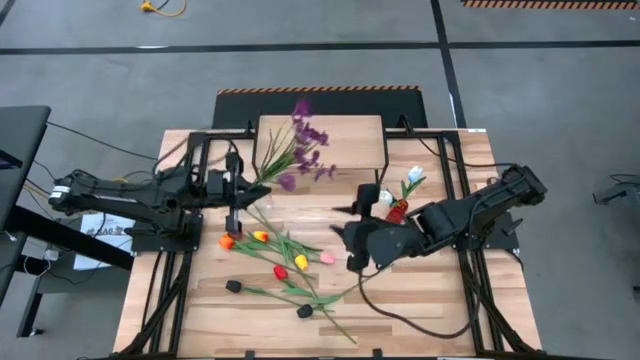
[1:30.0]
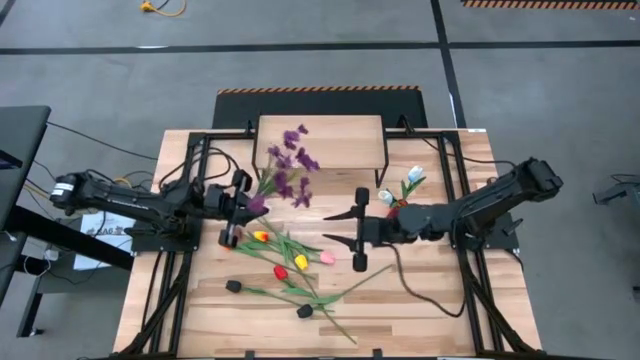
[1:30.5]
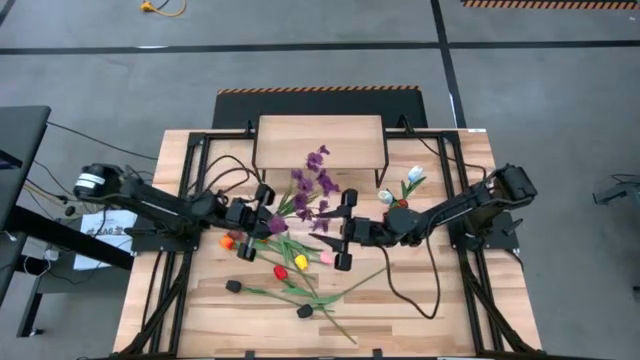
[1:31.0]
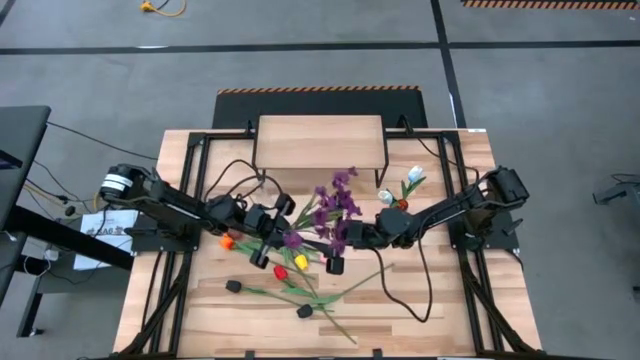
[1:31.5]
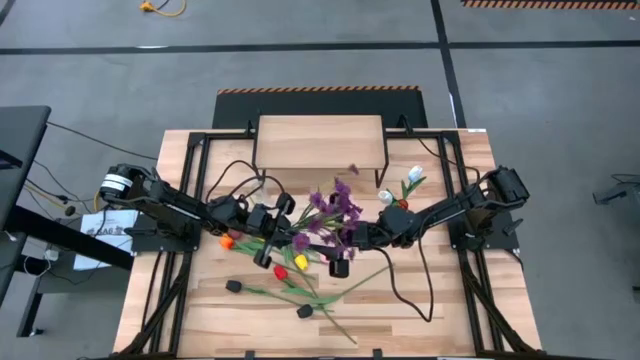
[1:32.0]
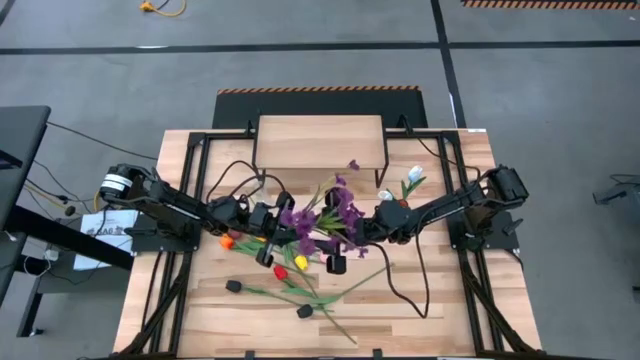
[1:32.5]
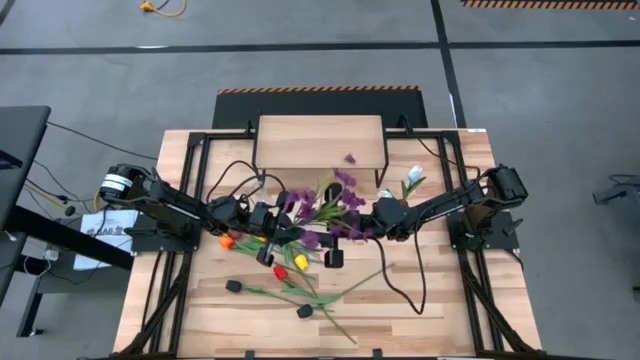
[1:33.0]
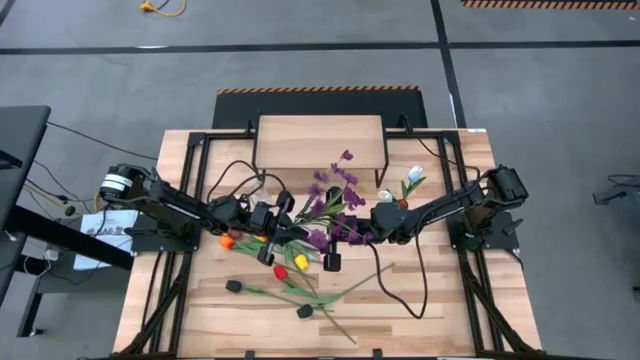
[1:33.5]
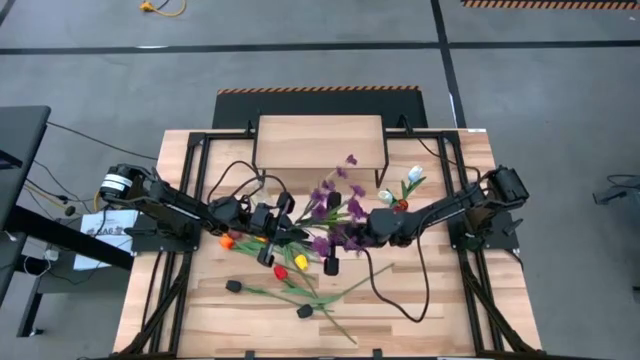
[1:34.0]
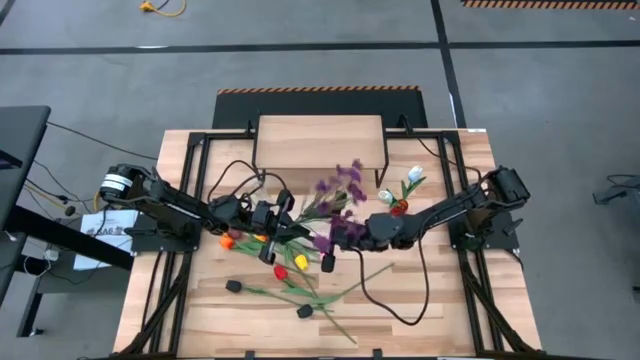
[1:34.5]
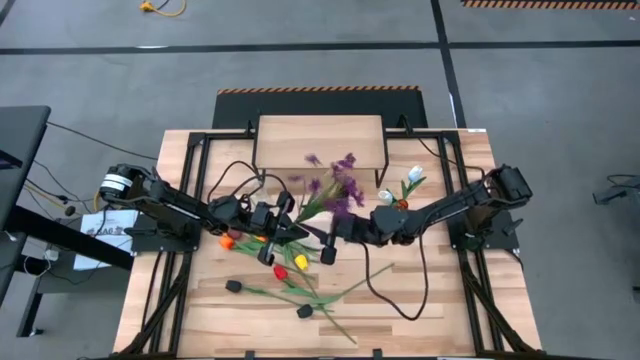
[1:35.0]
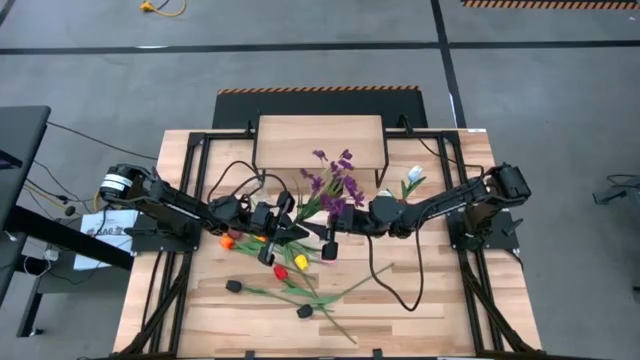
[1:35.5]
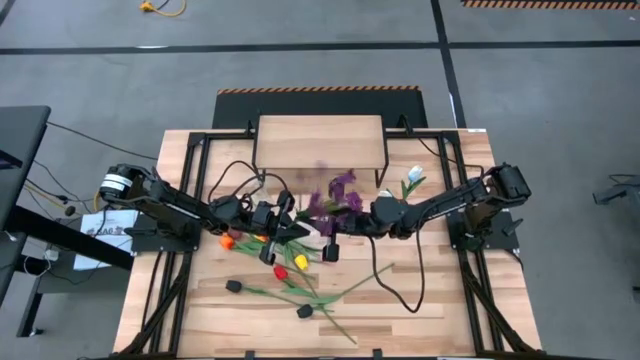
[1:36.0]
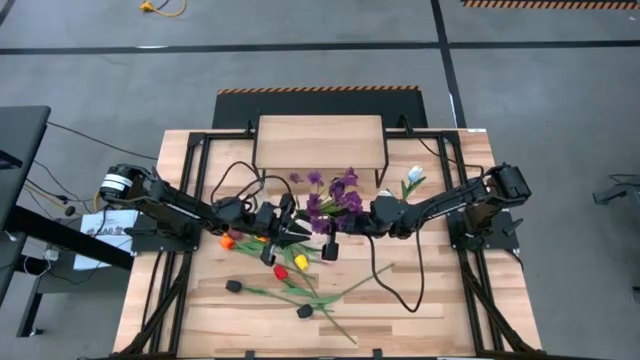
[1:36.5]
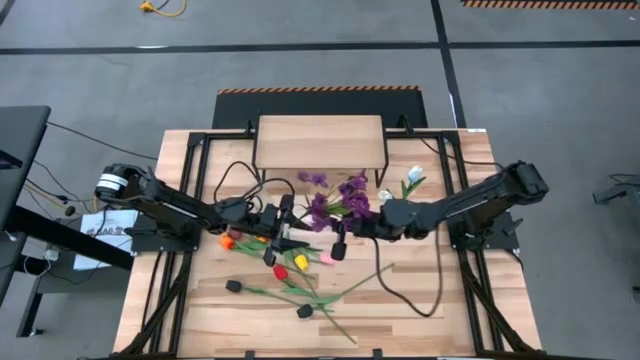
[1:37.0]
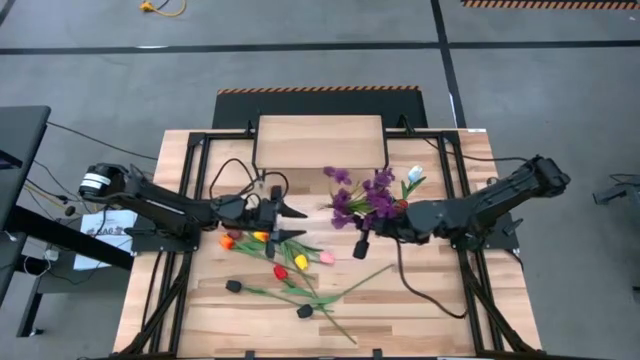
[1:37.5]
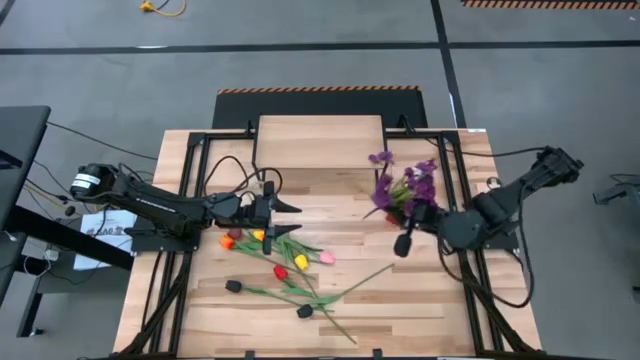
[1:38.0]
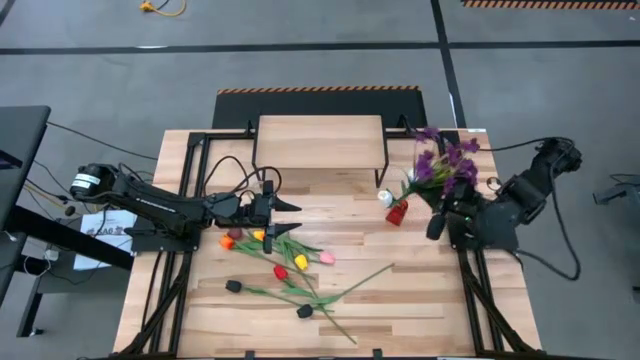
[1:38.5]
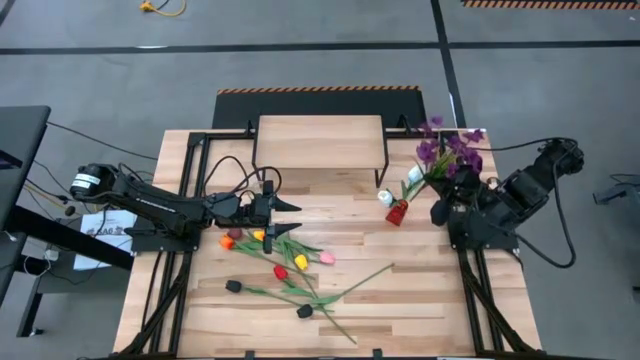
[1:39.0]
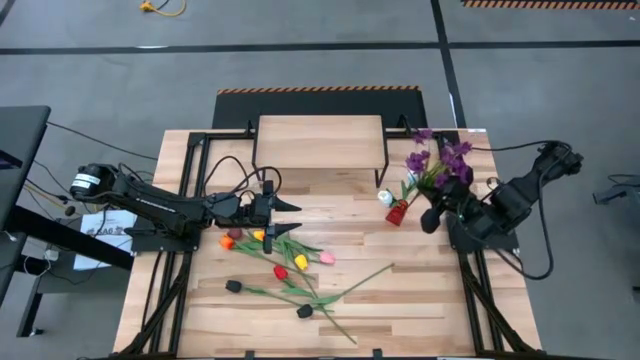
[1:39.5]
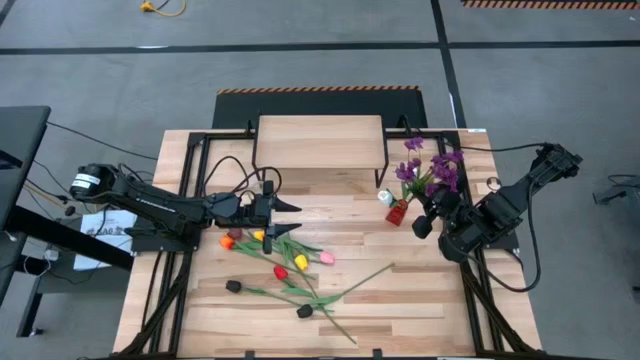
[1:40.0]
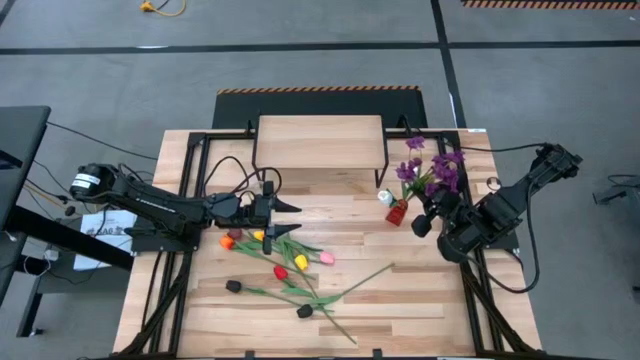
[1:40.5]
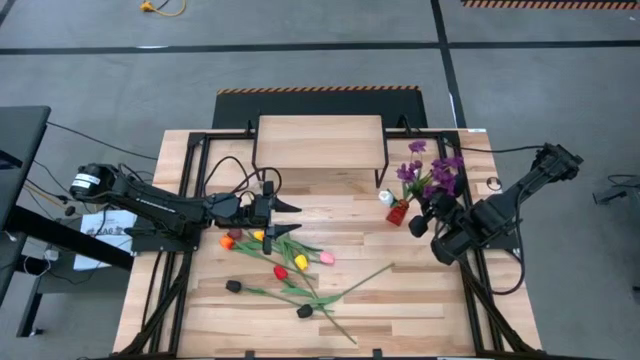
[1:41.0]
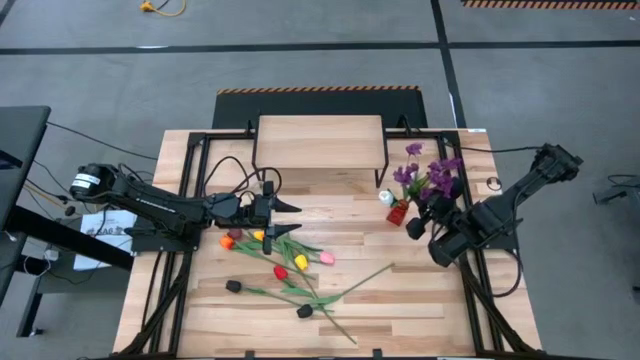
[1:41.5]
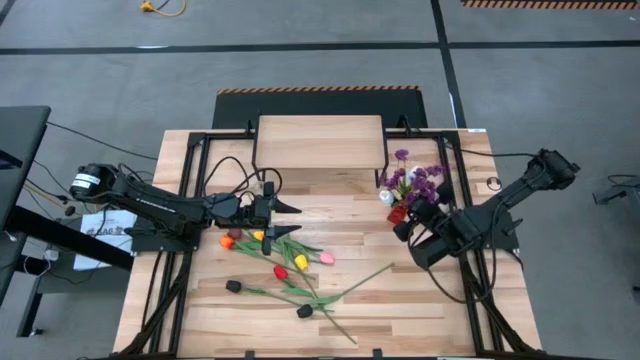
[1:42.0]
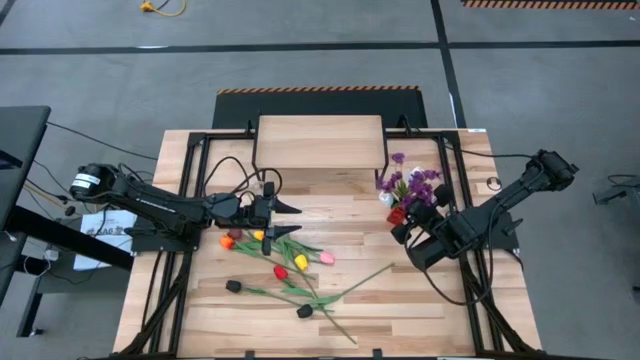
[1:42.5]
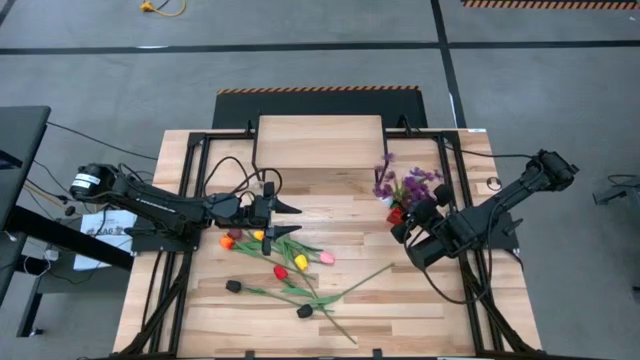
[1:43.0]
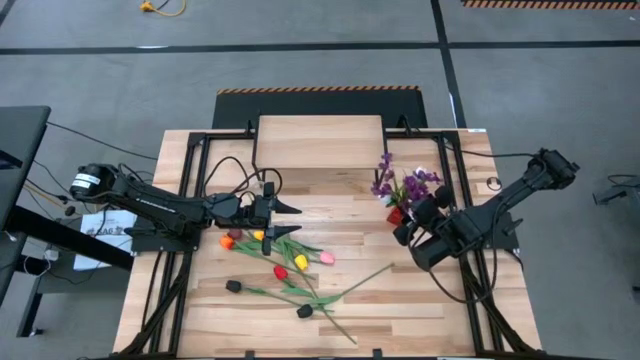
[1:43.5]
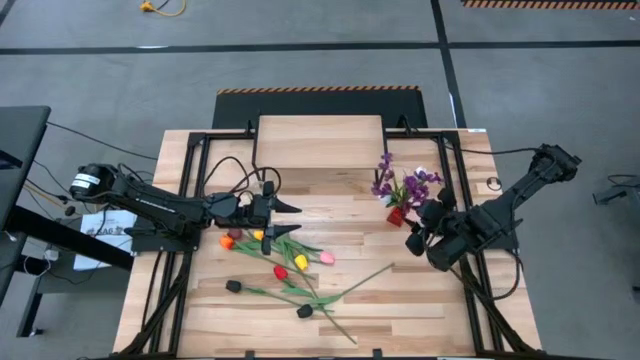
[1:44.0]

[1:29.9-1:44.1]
Task: Pick and place flowers into a vace then onto a shelf
Put the violet flowers into the red vase

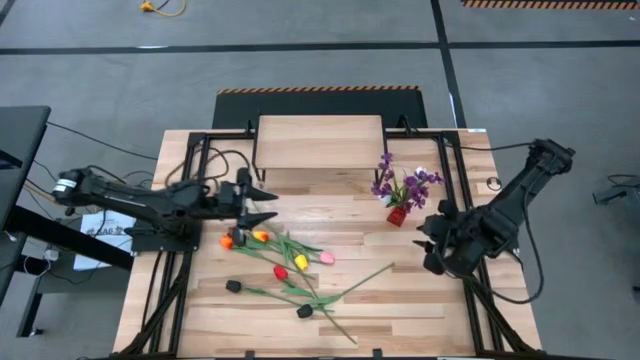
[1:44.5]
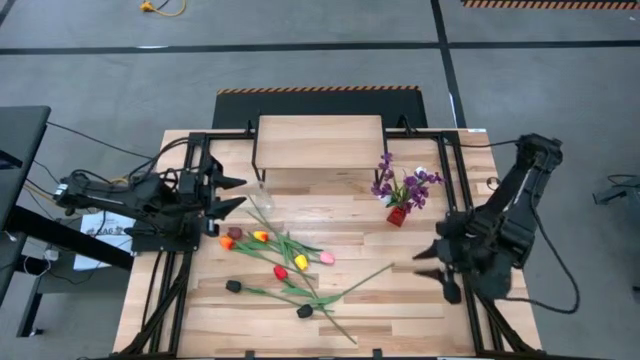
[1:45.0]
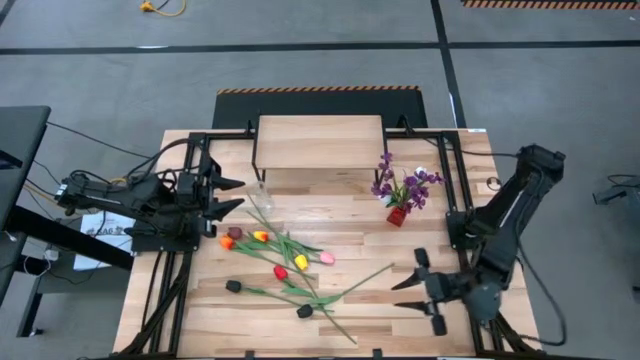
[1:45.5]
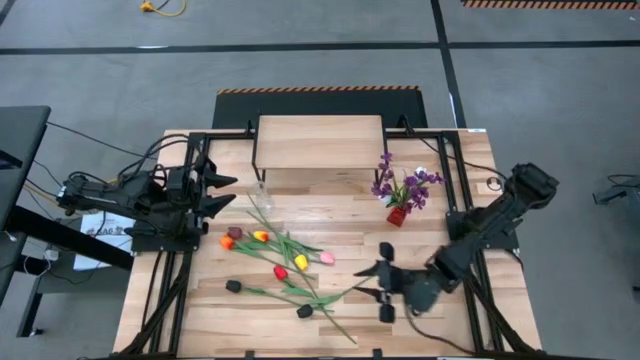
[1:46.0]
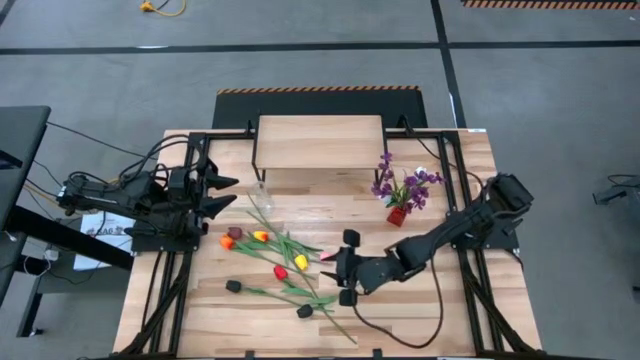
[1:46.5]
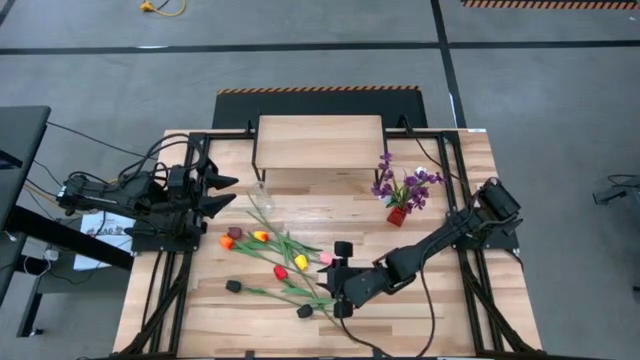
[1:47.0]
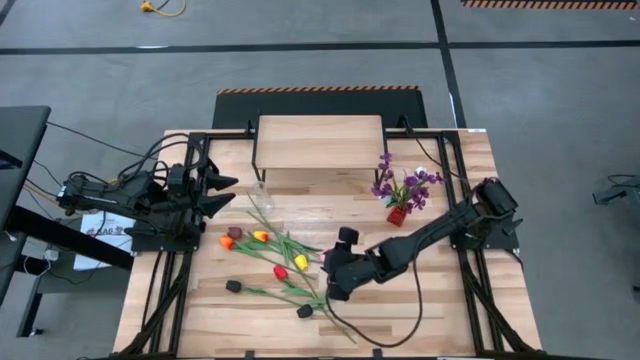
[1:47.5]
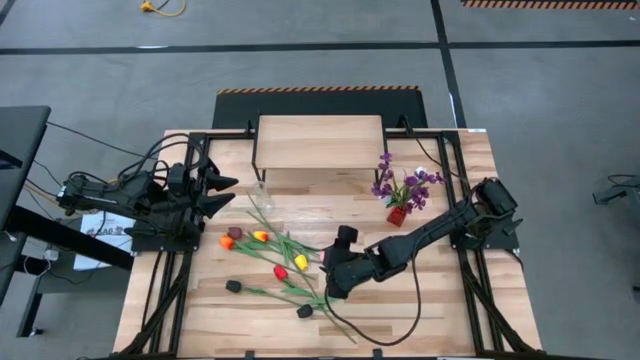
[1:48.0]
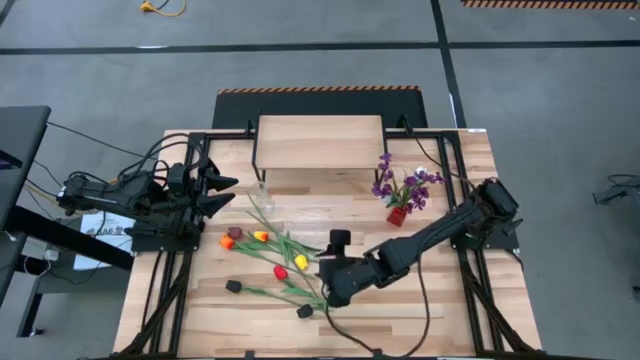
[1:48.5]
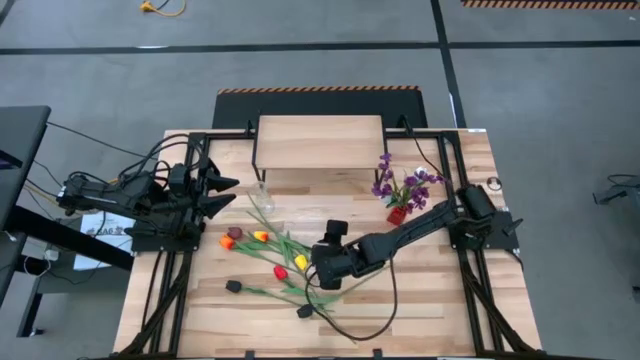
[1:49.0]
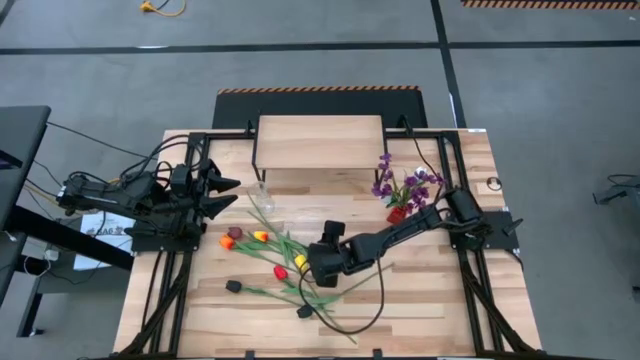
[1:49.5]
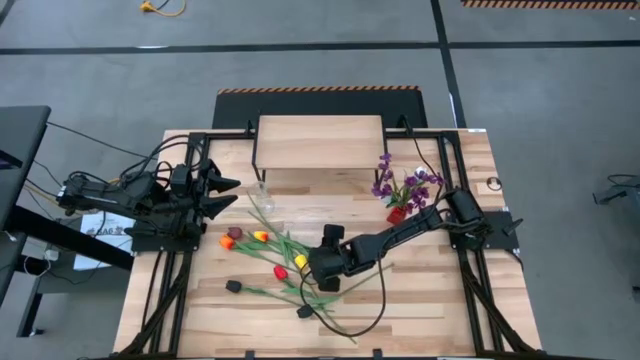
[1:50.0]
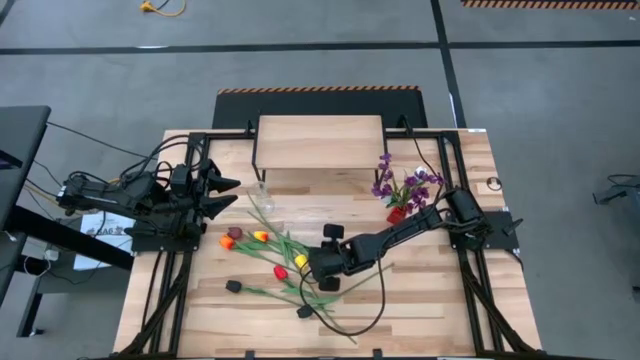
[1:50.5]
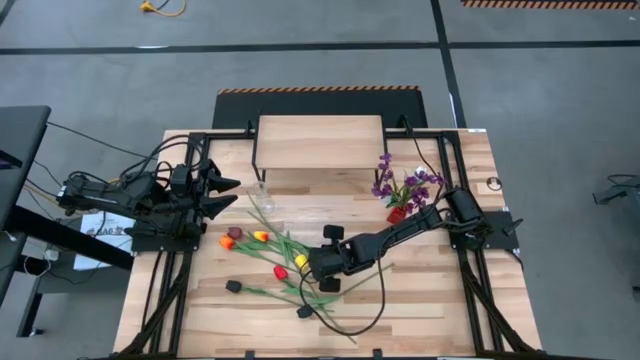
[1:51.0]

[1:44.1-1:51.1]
Put the pink flower into the red vase
